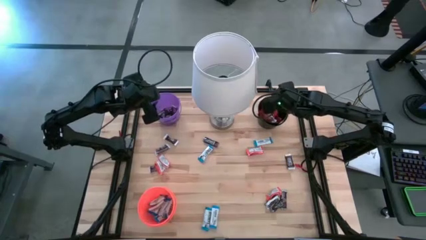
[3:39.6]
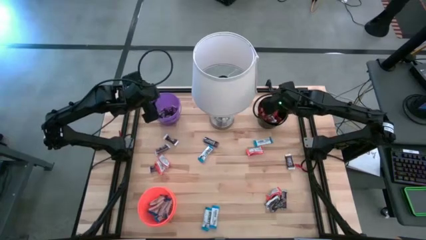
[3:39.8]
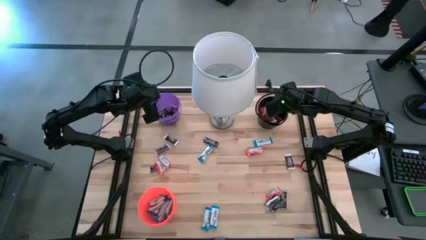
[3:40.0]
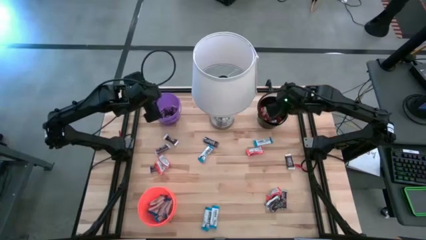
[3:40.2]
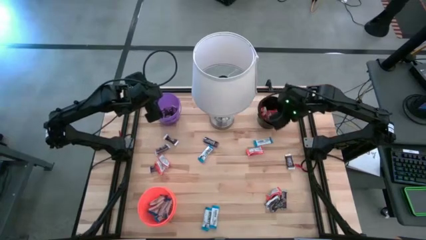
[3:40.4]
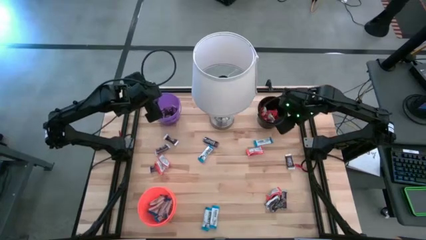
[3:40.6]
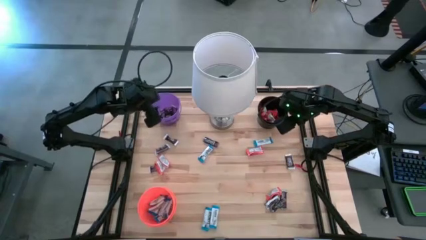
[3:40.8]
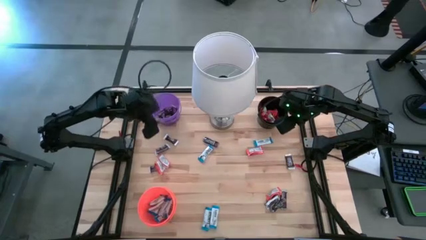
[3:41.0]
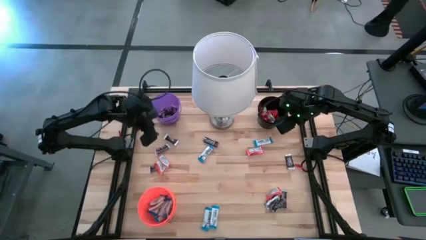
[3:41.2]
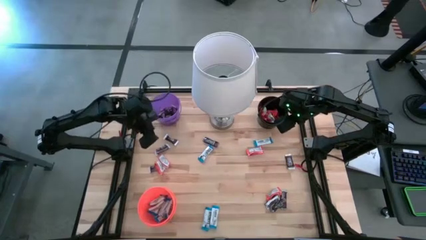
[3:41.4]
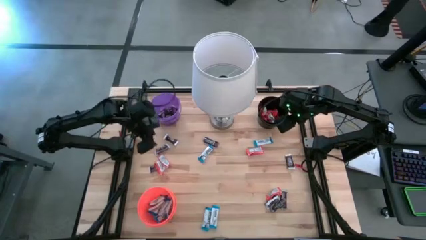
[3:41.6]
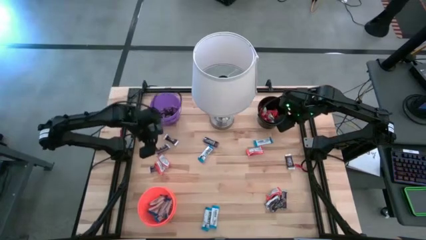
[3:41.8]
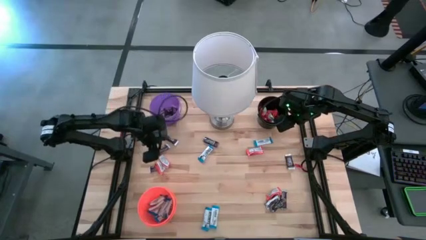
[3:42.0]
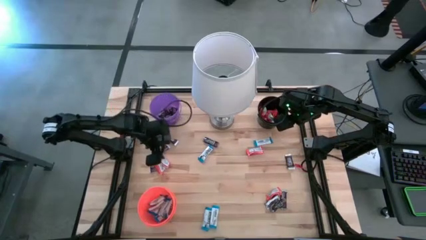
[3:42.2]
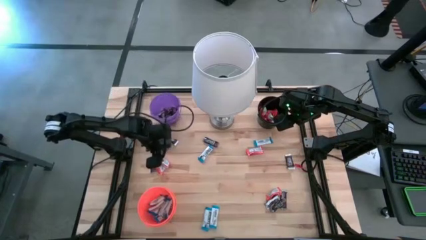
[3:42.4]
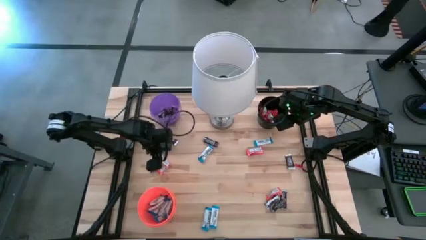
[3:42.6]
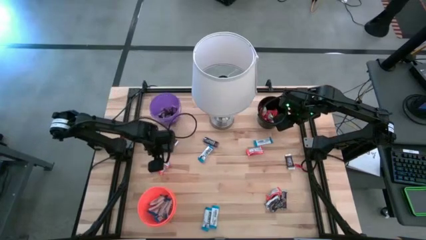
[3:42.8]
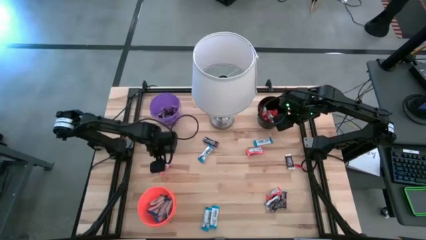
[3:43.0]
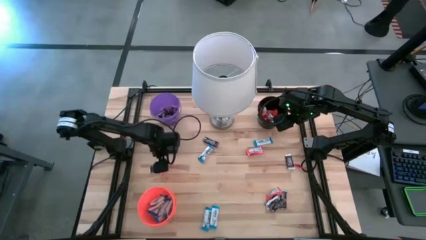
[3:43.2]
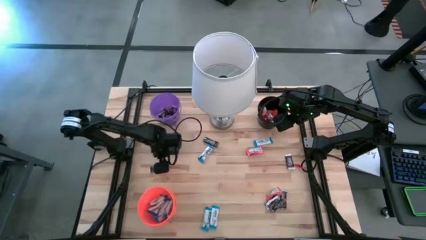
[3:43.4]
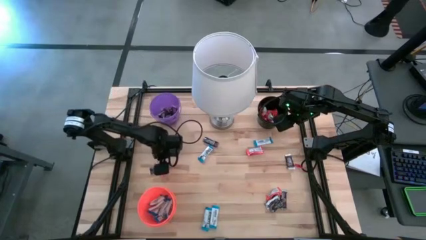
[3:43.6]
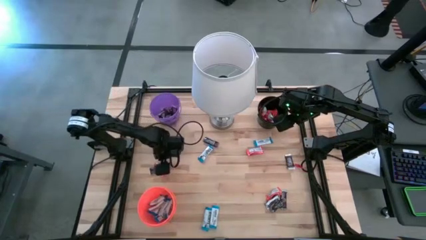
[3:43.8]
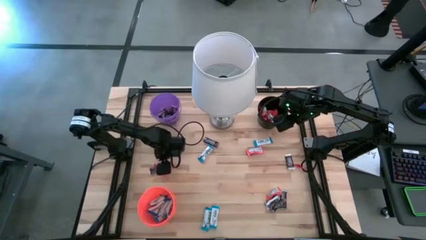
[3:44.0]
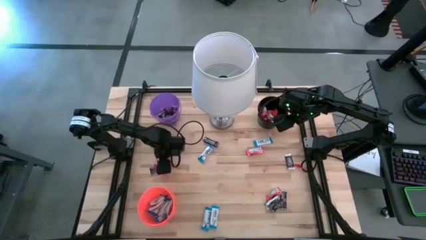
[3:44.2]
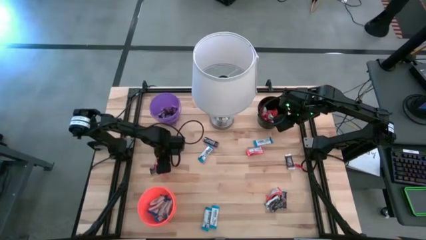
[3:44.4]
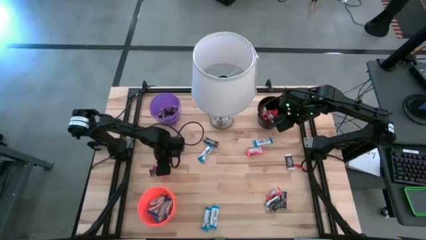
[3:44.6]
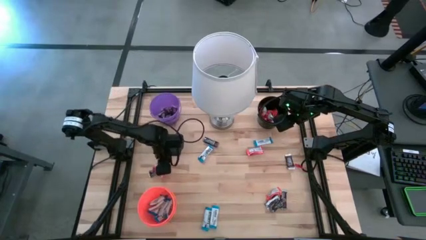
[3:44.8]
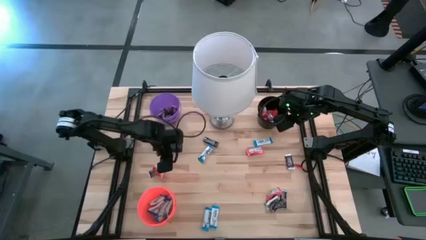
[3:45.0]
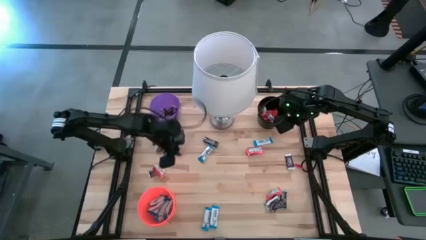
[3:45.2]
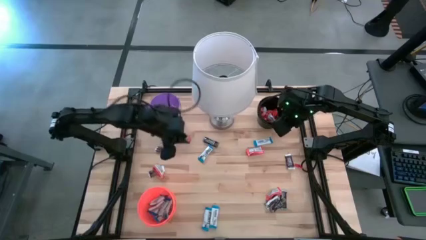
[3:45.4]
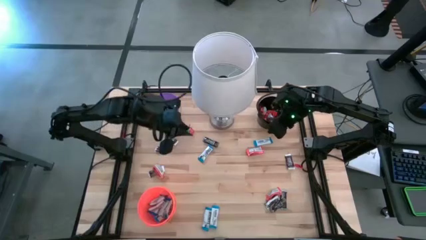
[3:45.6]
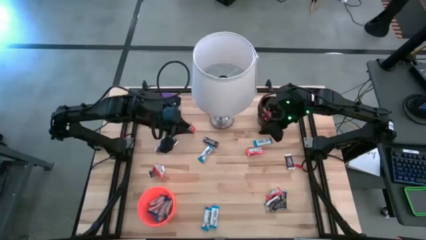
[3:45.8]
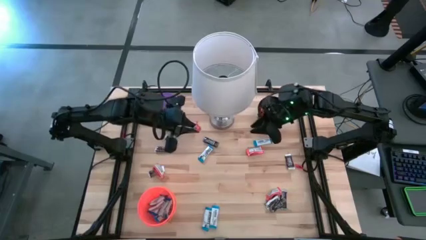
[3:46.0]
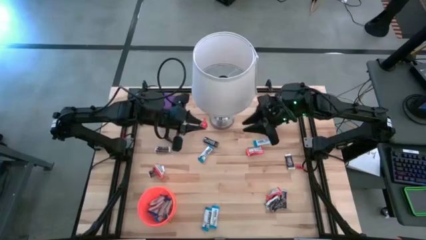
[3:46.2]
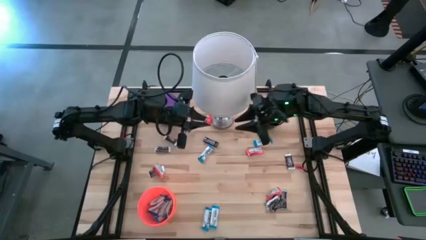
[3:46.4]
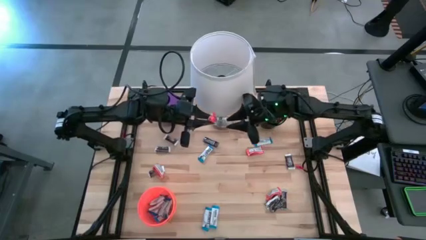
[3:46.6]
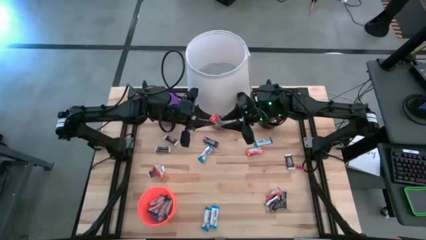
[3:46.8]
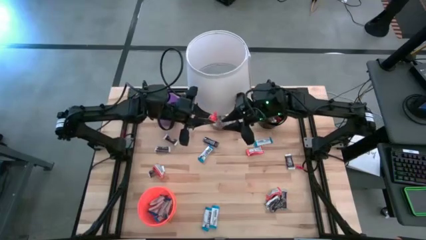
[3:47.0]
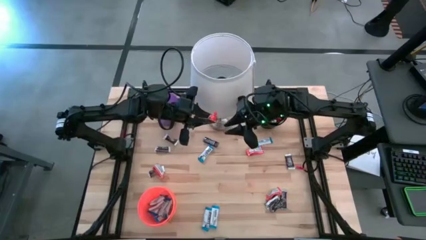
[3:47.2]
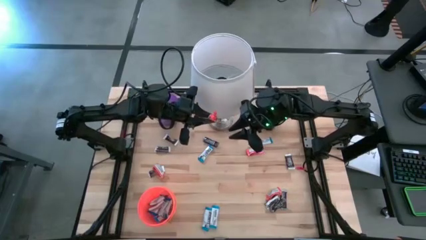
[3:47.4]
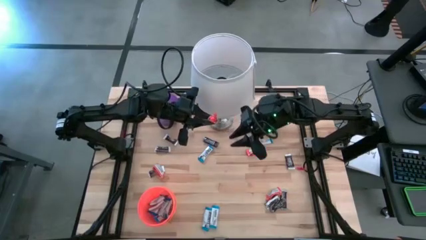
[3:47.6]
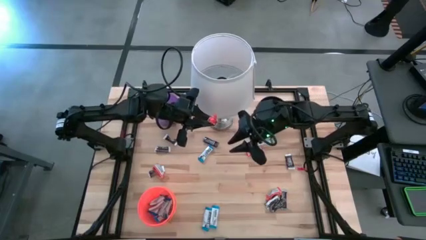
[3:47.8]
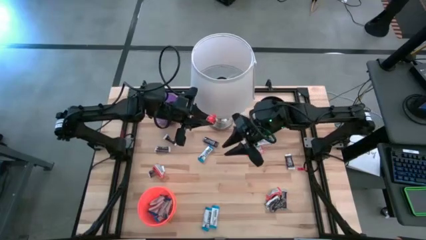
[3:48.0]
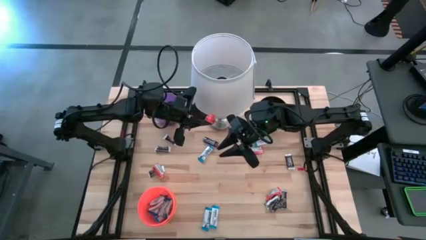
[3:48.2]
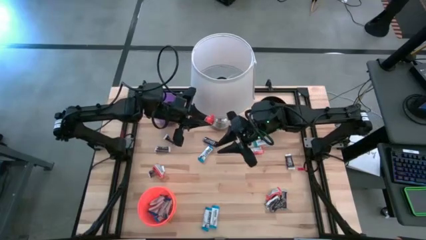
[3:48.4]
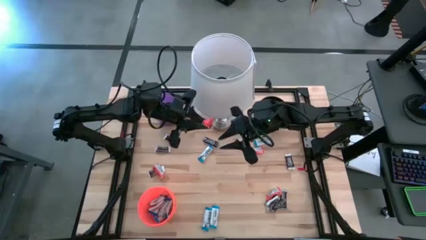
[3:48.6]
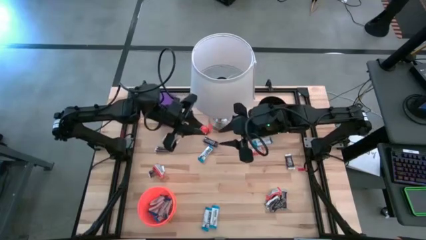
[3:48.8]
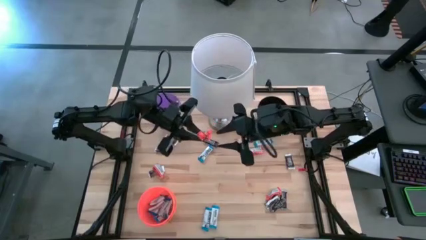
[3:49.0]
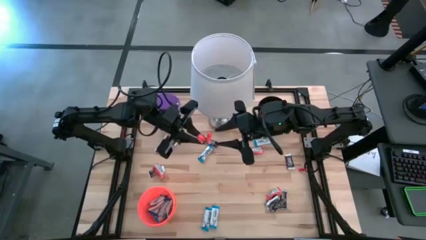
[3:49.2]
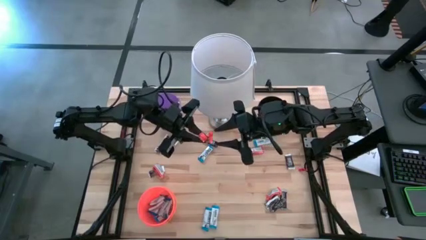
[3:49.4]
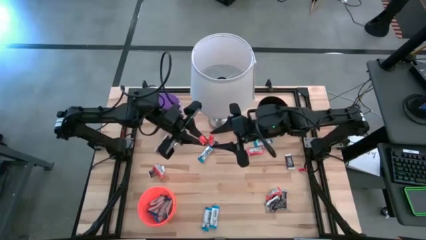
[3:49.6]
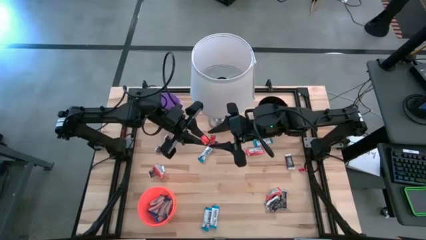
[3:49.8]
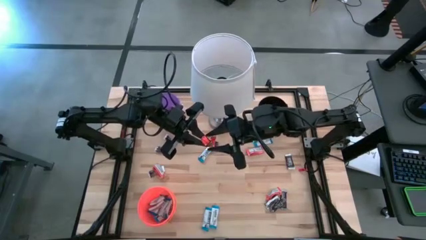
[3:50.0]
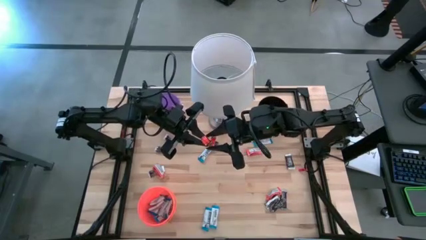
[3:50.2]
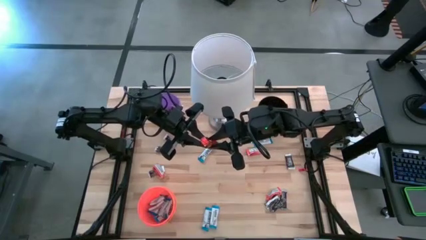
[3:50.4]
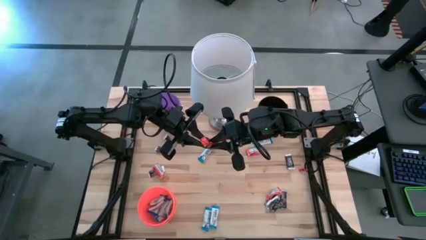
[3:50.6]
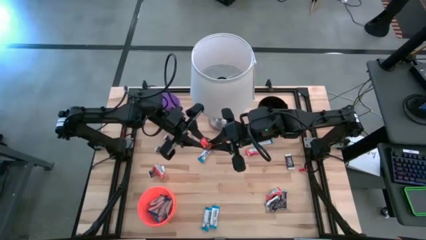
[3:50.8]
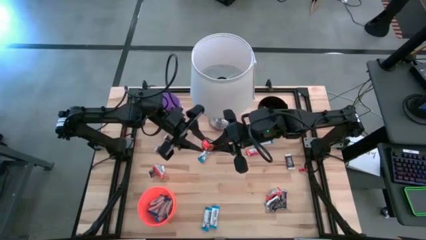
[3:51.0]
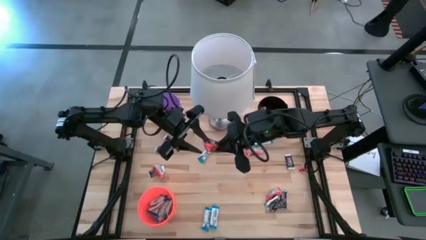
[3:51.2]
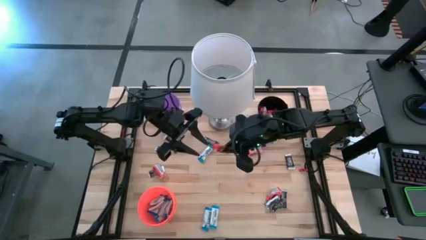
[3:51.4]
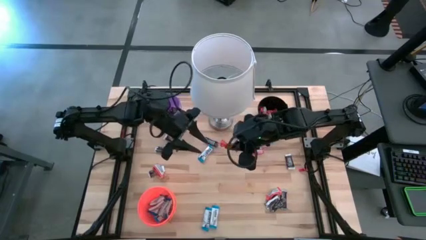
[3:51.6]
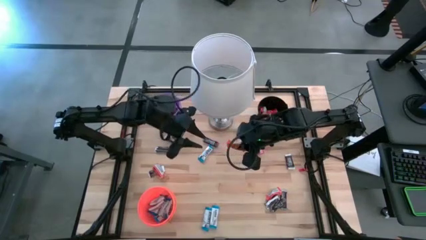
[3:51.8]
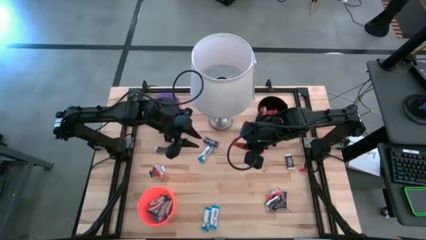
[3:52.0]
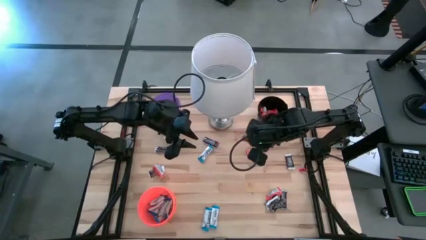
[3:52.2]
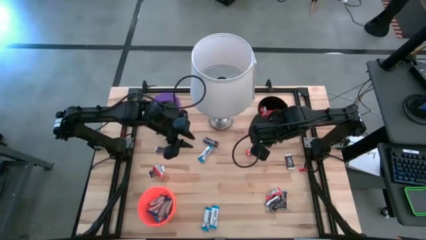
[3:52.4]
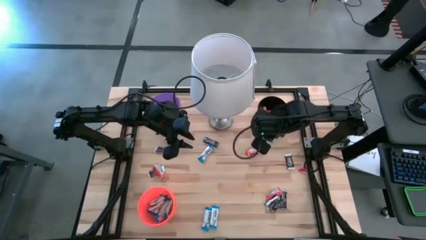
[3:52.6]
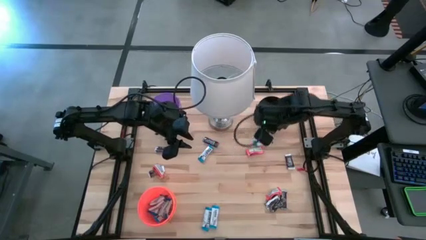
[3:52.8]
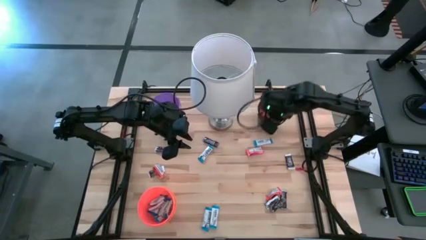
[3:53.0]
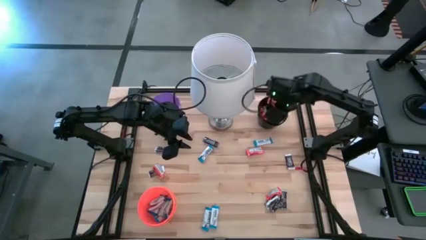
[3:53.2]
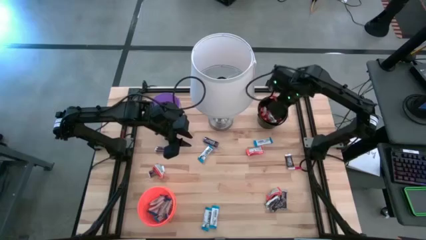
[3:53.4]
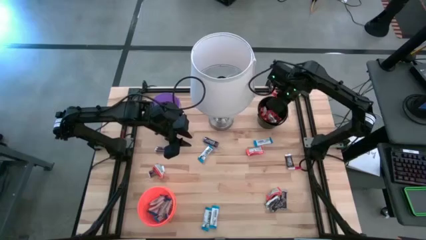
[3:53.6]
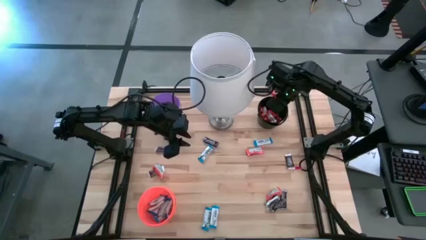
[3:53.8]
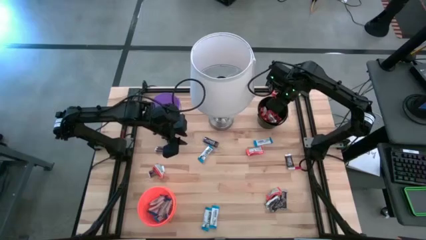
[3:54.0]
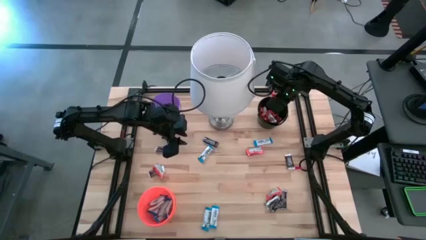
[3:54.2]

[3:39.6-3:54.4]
Task: Organize candy in baskets
Put the orange chocolate bar into the black bucket

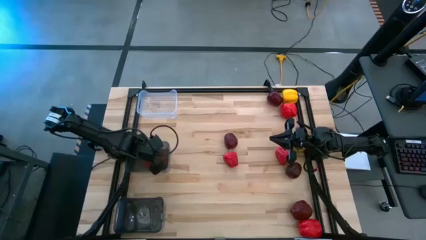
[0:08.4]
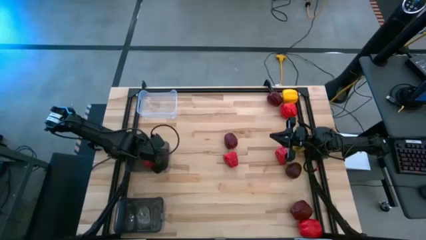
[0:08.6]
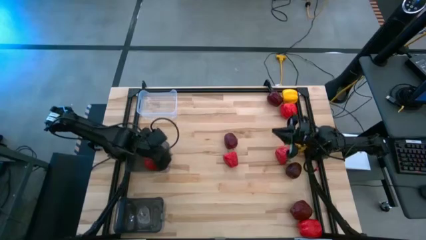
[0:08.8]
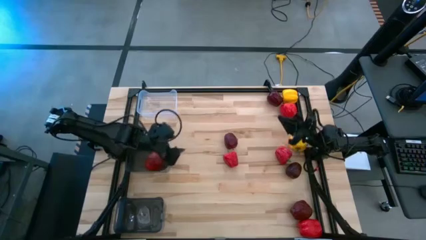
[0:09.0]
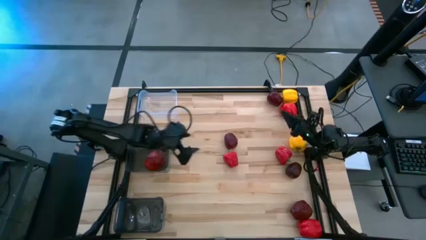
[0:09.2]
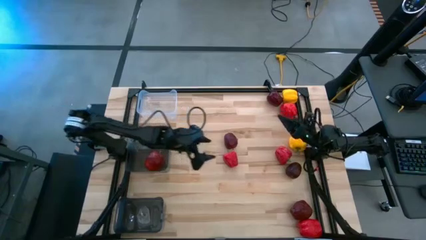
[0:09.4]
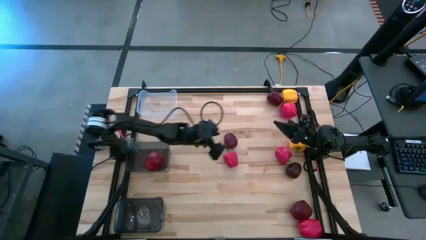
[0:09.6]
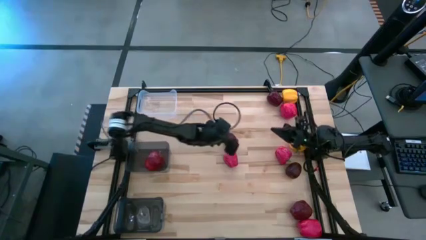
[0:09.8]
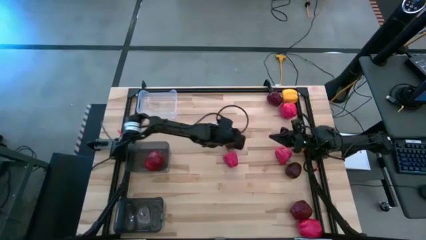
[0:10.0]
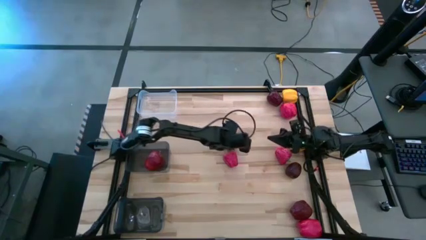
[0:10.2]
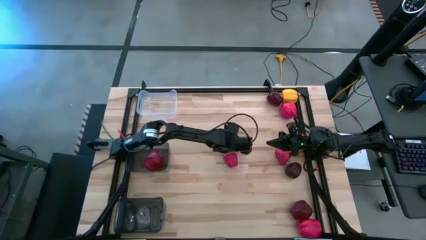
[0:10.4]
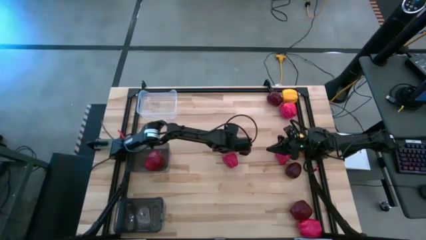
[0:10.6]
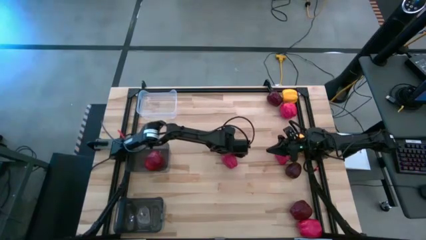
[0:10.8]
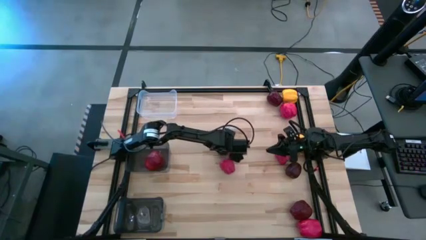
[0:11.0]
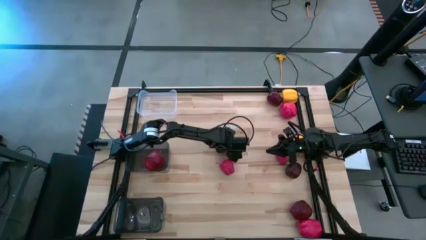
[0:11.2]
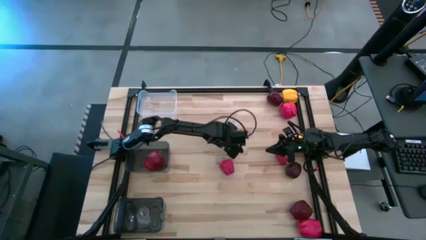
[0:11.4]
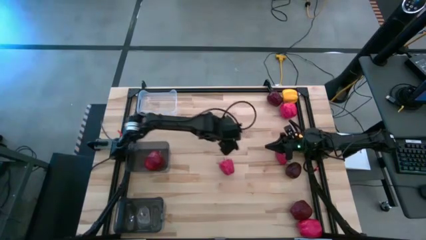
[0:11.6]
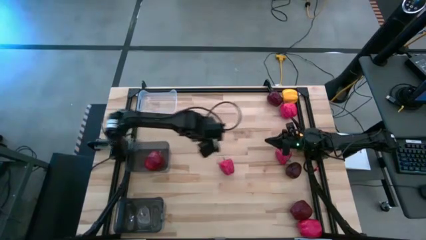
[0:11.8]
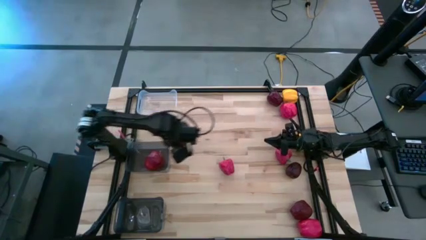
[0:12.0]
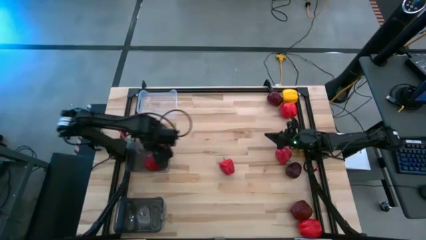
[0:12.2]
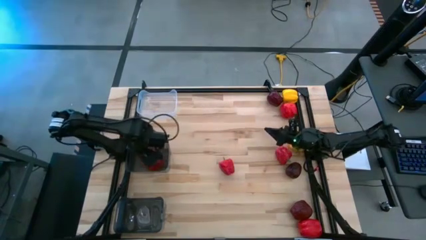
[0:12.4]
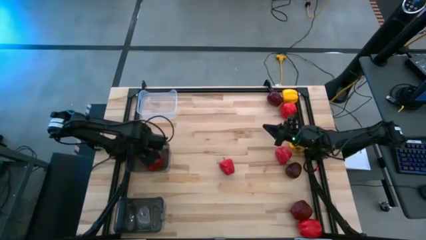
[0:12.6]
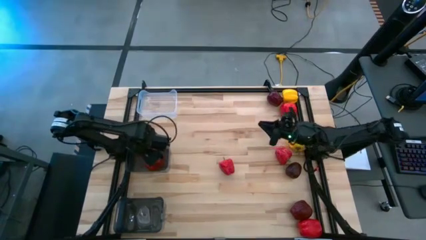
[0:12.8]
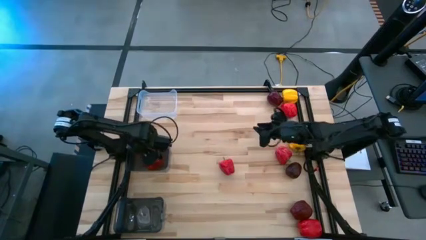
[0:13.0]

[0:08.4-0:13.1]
Task: Sort produce into baskets
Put the red apple into the top black bin
